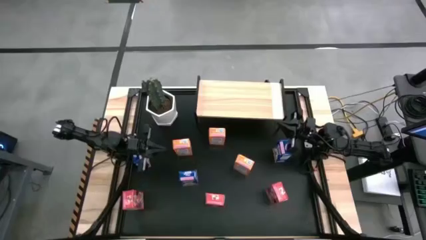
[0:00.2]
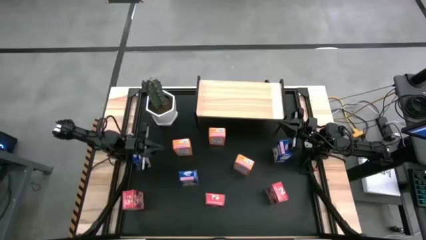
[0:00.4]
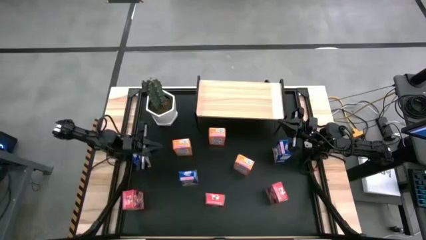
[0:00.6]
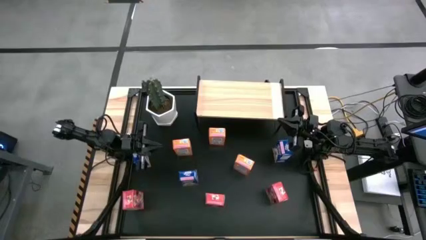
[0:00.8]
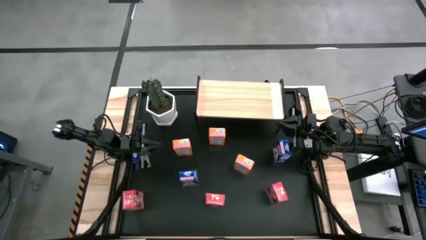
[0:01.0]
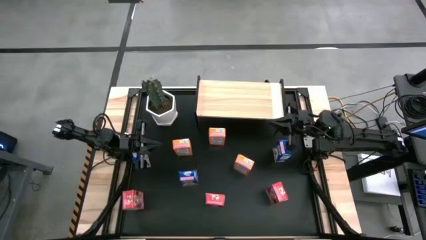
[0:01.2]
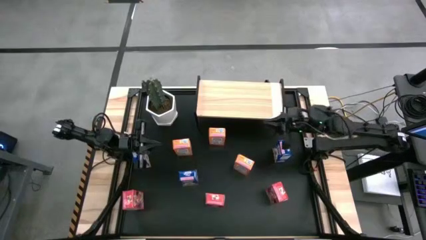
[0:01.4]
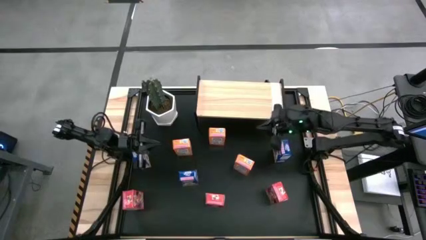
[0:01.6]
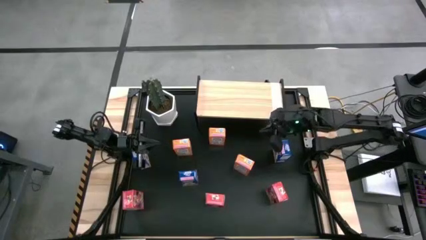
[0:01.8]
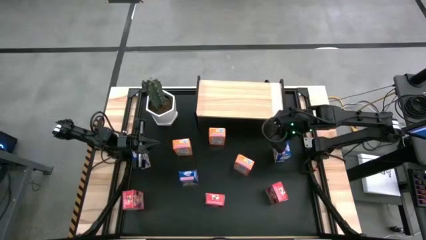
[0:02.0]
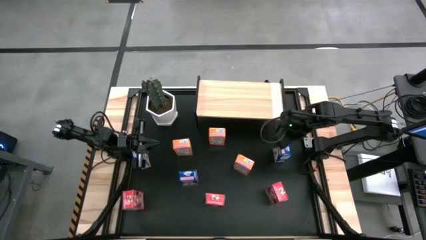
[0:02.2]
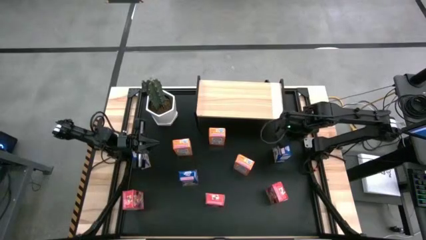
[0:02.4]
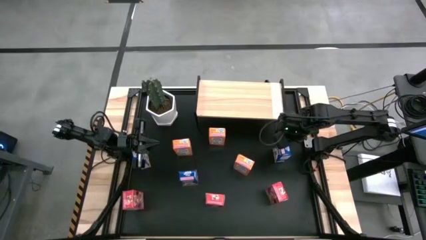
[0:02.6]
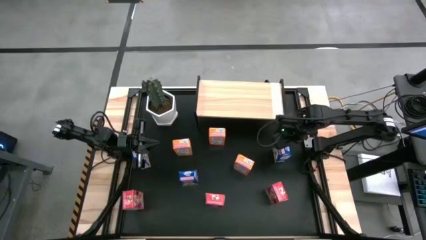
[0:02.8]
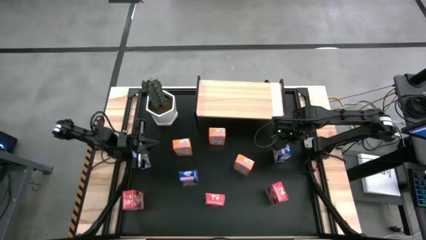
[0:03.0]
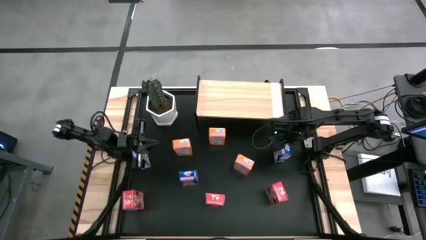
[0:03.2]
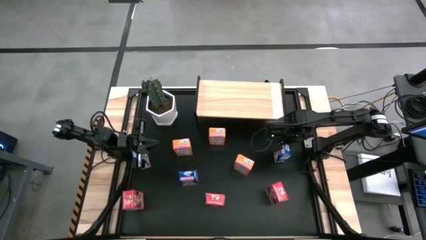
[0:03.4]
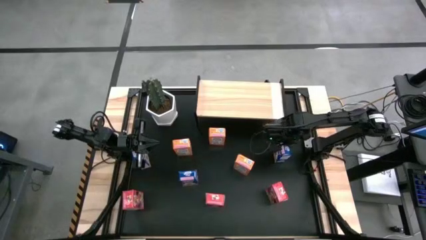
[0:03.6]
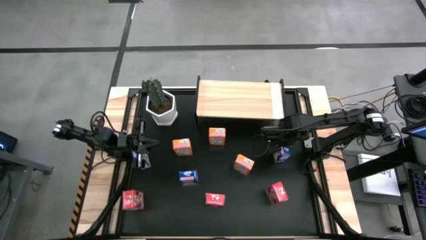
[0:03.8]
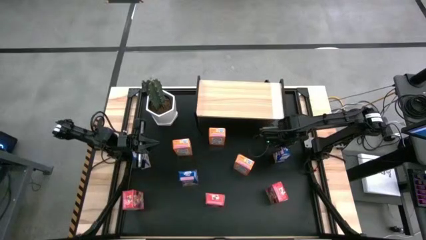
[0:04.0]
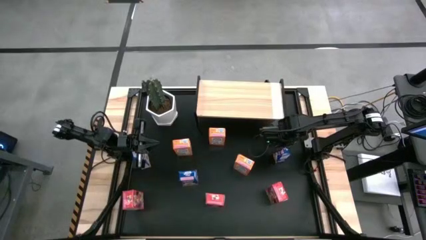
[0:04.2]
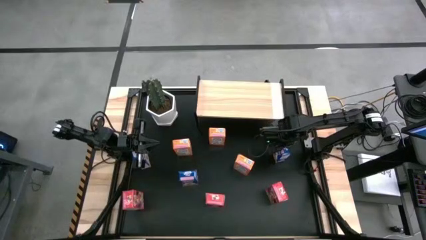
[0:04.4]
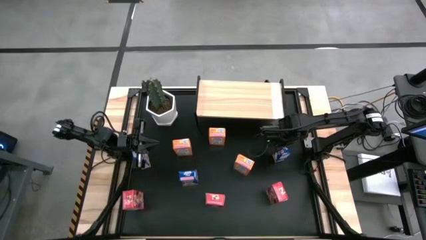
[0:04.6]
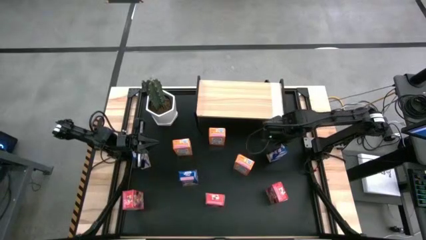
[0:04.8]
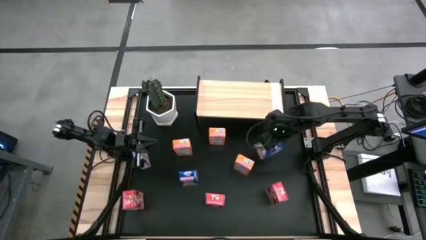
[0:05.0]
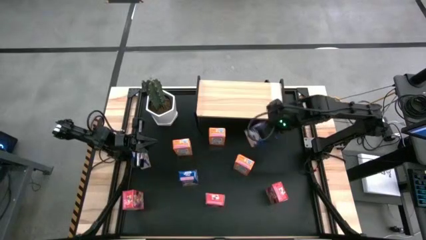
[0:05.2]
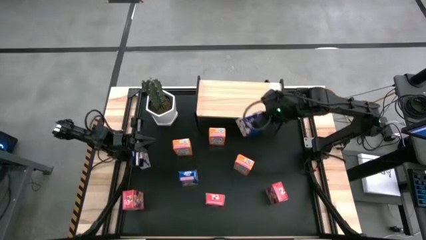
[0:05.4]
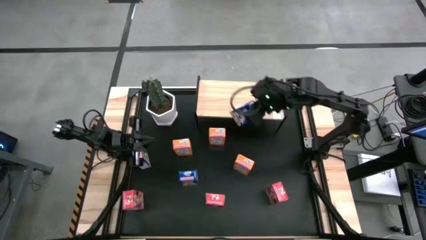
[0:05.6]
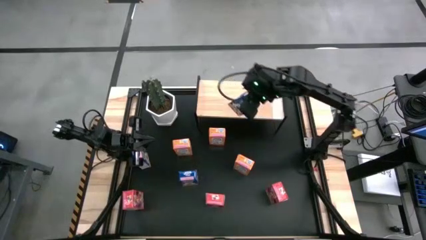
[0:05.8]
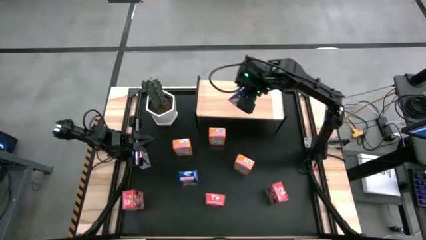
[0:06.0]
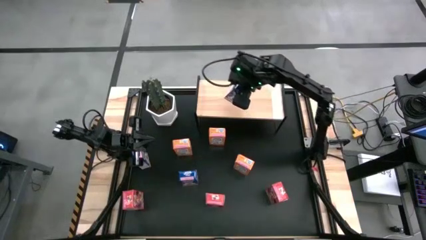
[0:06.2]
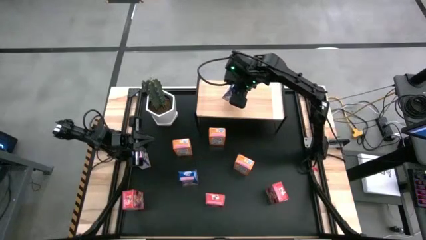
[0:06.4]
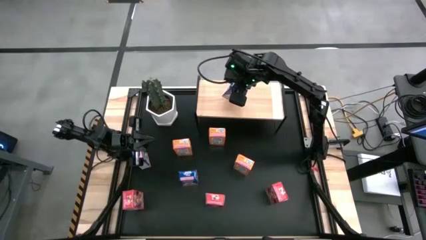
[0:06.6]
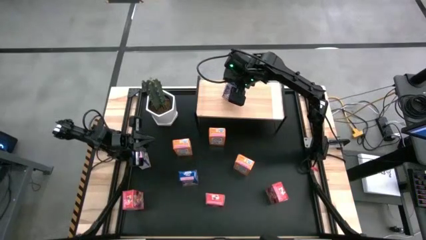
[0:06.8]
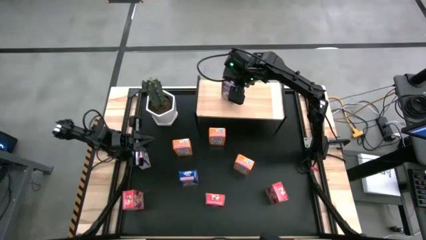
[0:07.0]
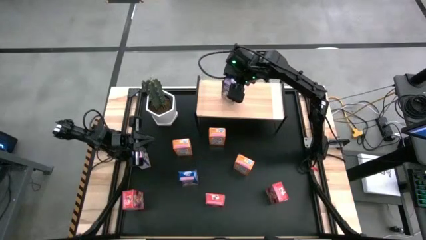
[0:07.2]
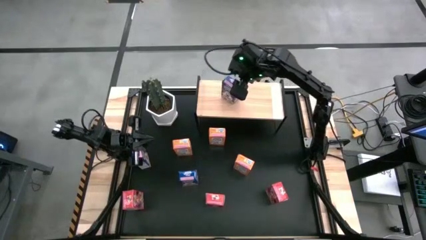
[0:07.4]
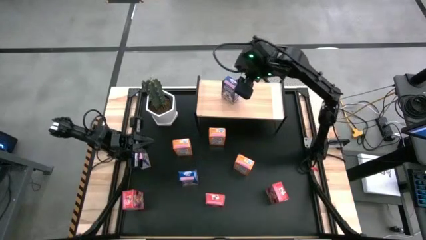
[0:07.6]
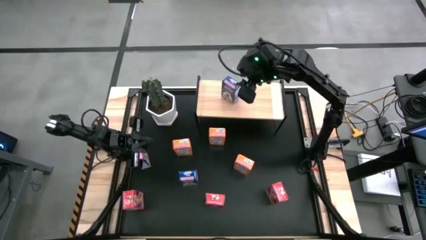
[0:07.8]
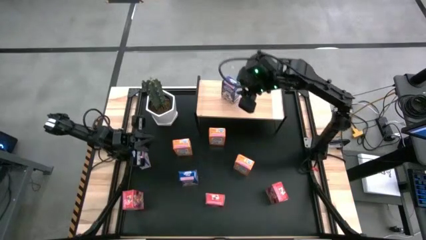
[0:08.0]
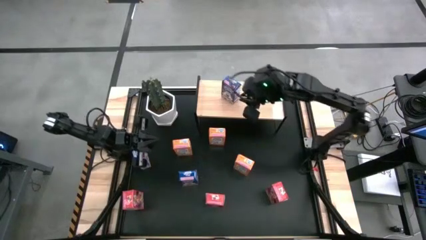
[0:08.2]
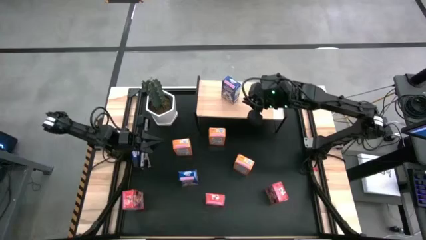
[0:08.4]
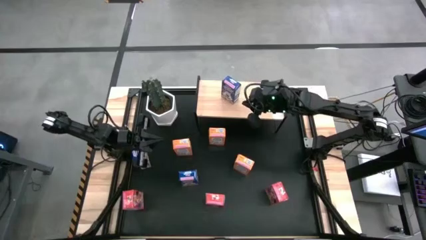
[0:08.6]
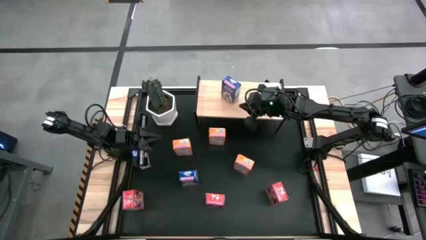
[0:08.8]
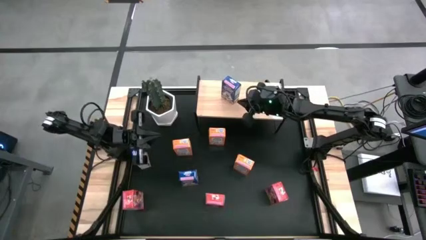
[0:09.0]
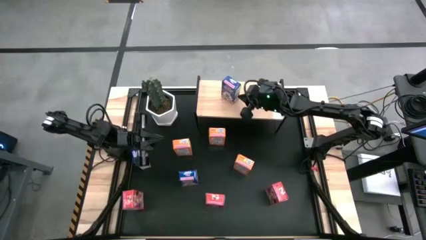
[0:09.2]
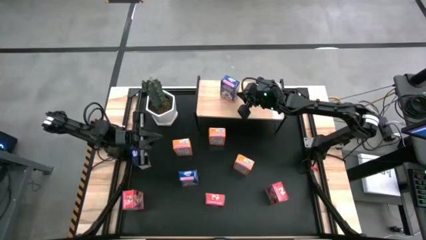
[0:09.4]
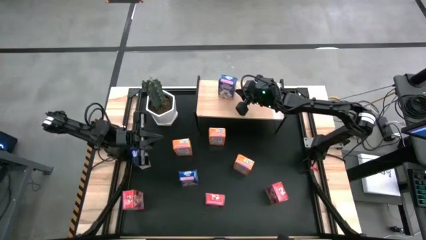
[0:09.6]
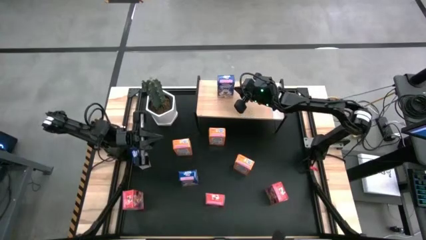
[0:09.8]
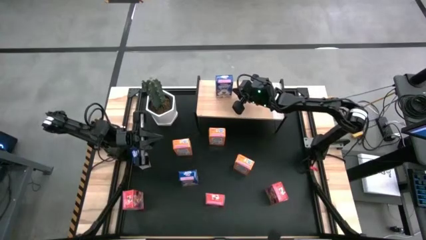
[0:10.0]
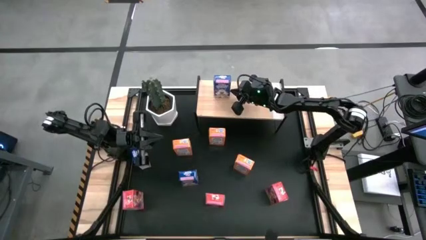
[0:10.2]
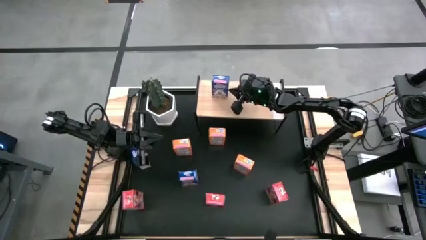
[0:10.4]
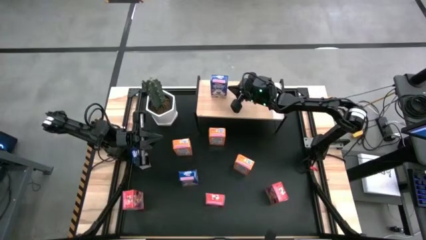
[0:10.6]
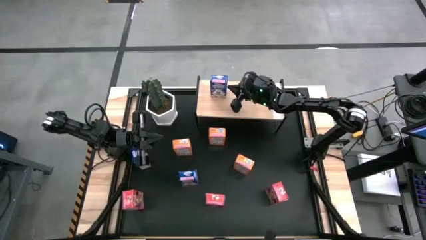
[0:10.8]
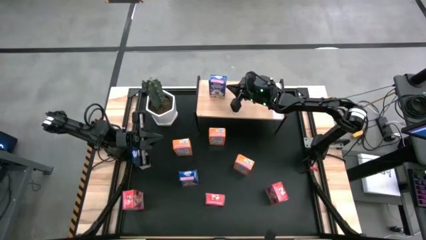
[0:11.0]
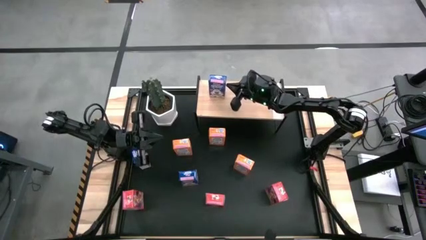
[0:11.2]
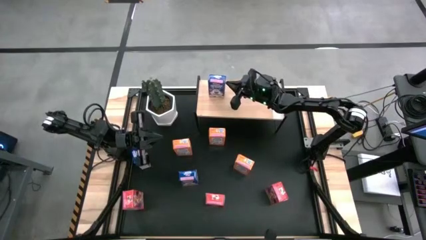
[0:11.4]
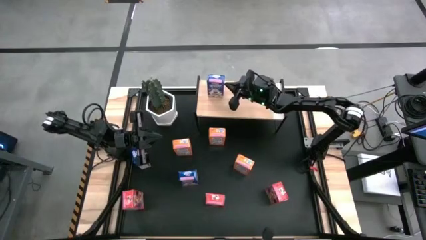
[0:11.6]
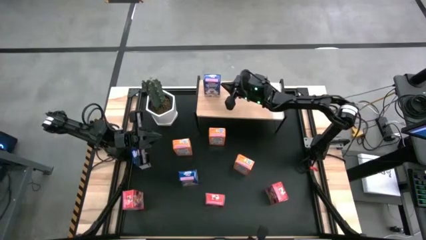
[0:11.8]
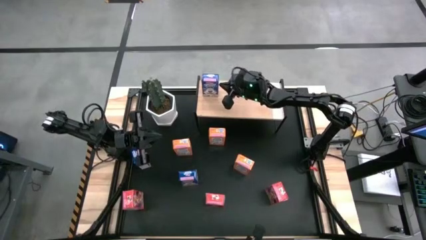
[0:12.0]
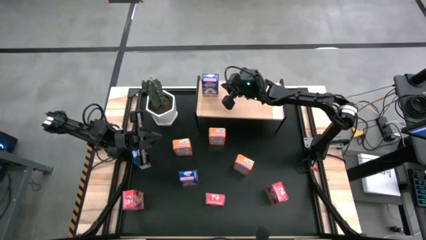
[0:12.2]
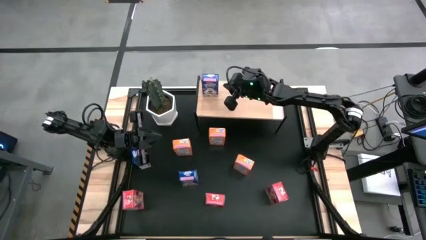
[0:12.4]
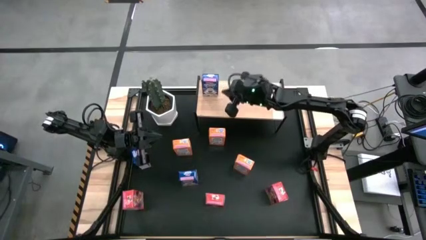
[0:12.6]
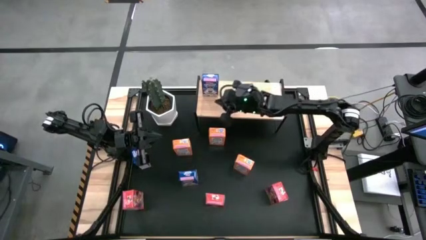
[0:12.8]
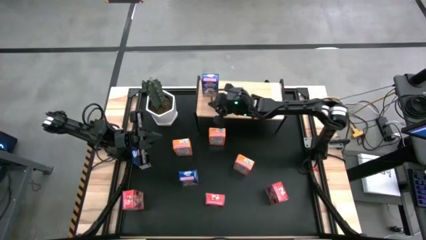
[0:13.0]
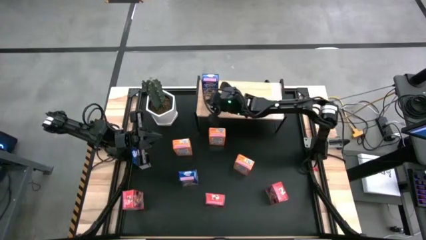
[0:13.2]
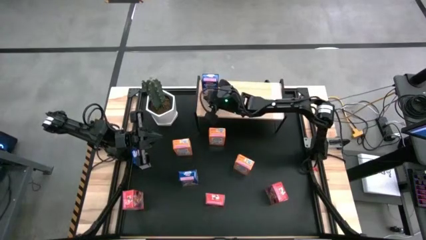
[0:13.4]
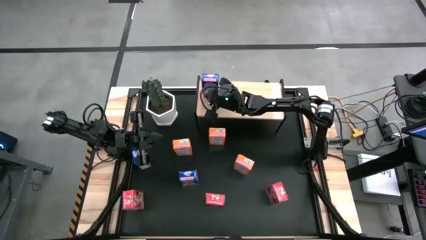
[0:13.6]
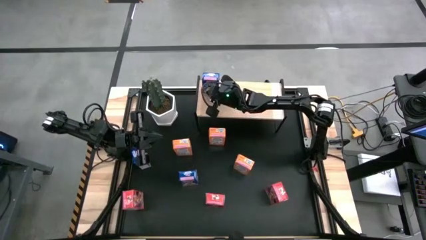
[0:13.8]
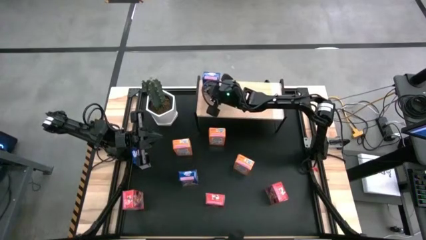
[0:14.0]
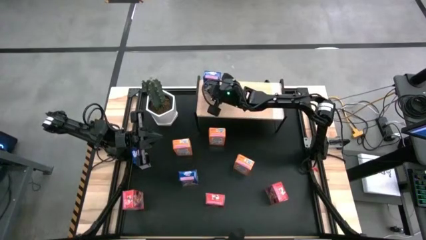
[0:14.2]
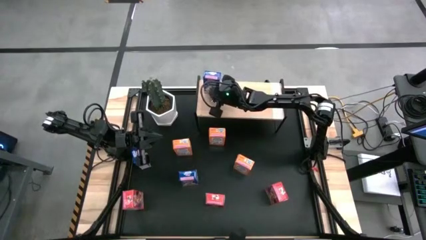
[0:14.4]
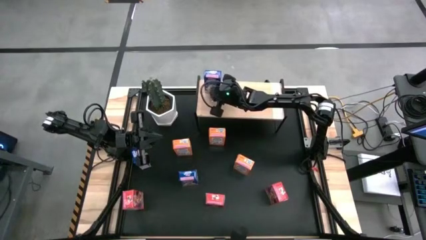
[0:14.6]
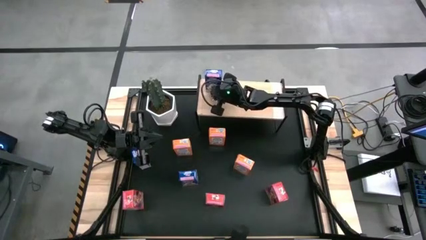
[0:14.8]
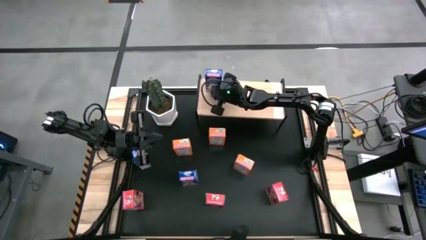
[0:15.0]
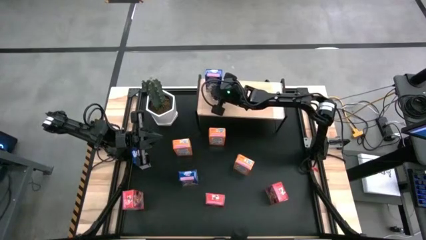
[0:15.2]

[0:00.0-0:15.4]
Task: Stack cereal on shelf
Put the right blue cereal box on the shelf
